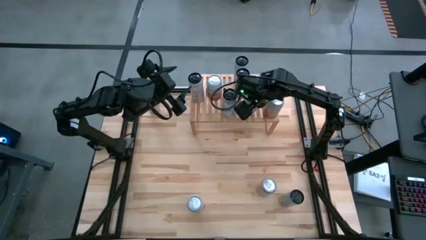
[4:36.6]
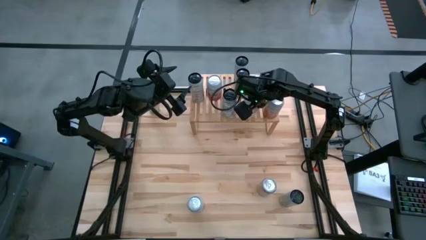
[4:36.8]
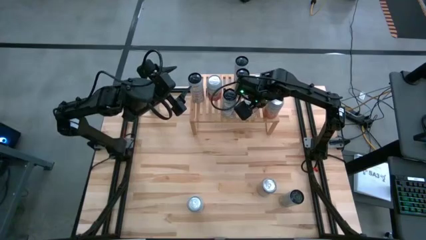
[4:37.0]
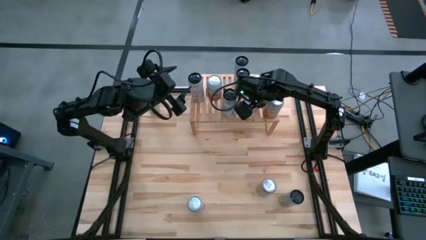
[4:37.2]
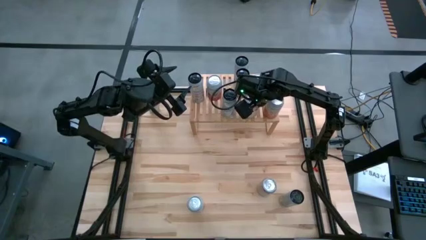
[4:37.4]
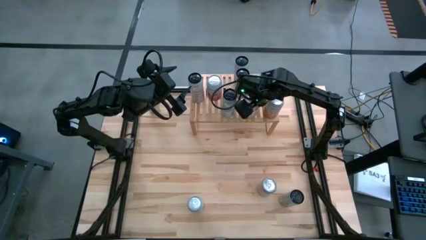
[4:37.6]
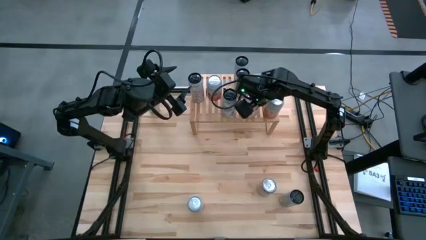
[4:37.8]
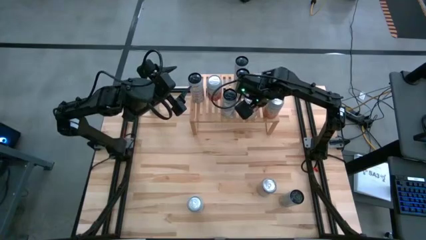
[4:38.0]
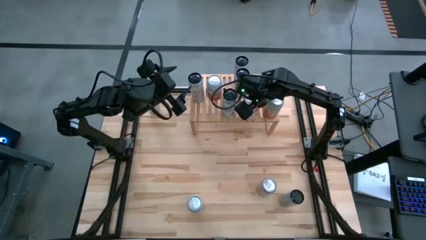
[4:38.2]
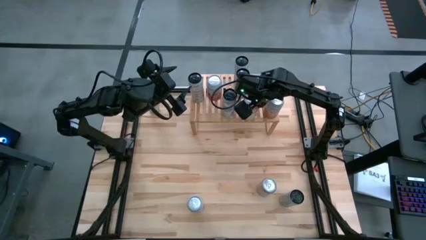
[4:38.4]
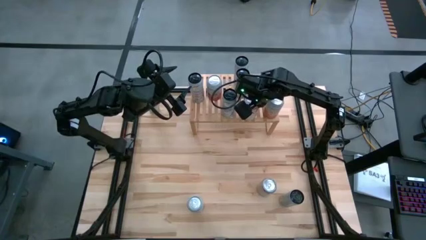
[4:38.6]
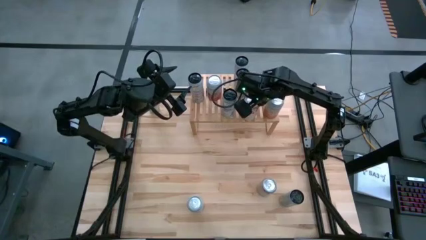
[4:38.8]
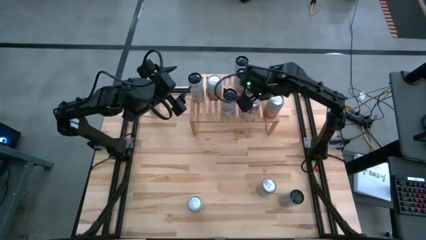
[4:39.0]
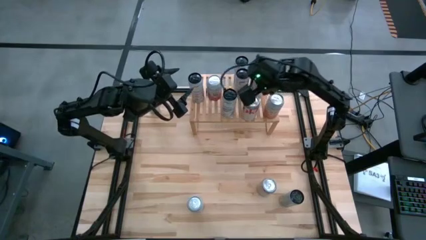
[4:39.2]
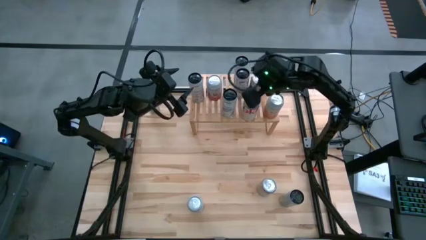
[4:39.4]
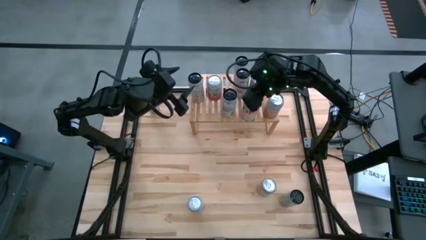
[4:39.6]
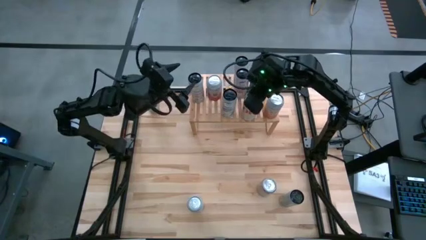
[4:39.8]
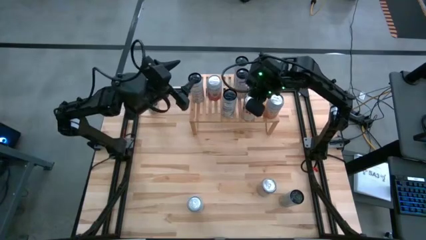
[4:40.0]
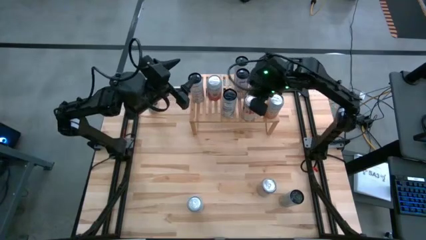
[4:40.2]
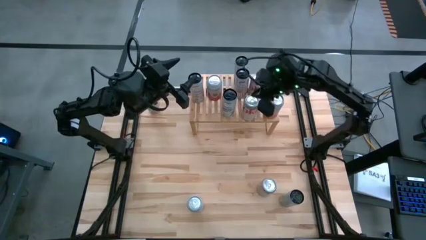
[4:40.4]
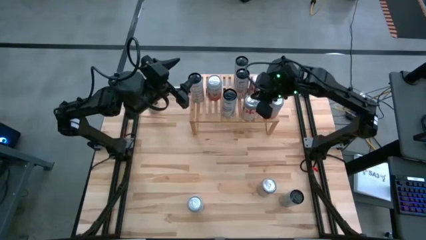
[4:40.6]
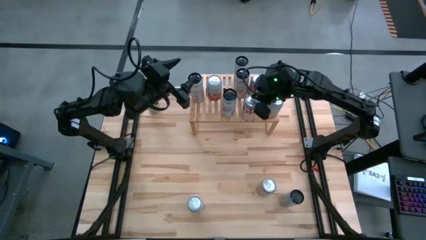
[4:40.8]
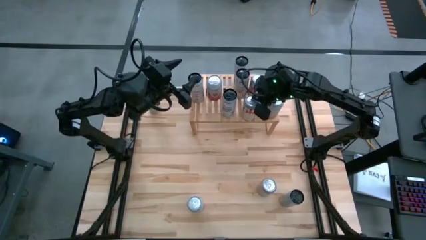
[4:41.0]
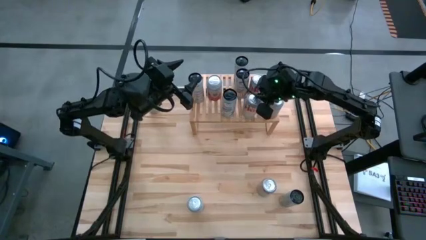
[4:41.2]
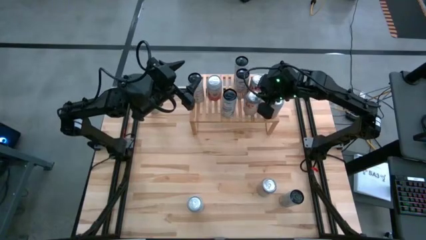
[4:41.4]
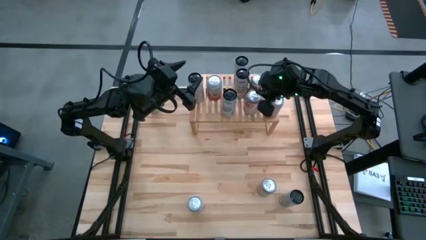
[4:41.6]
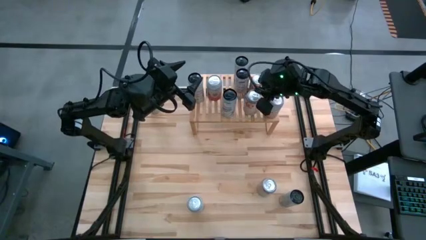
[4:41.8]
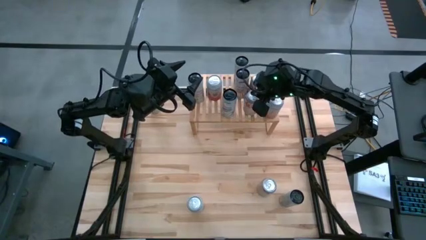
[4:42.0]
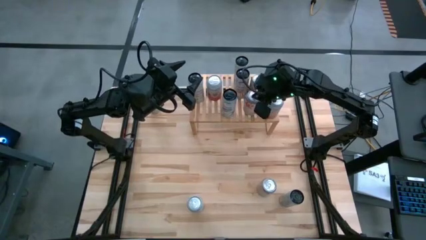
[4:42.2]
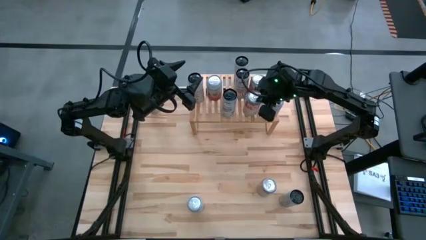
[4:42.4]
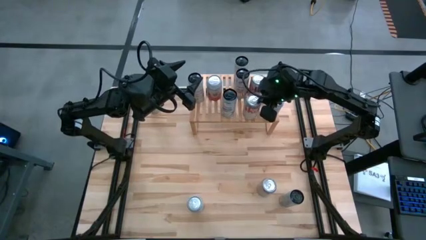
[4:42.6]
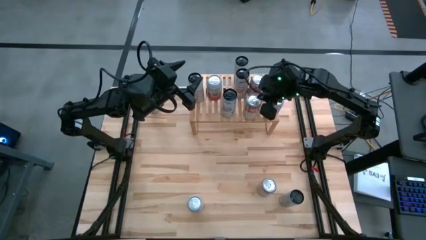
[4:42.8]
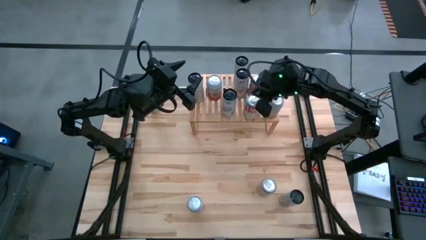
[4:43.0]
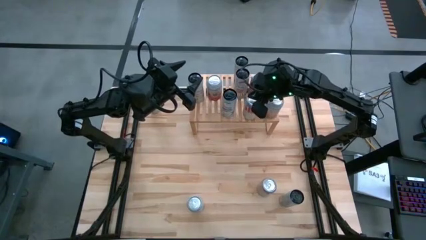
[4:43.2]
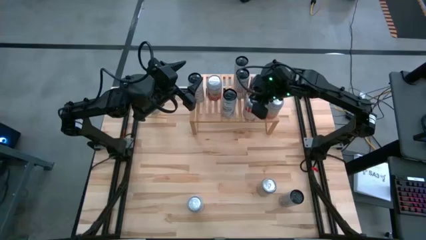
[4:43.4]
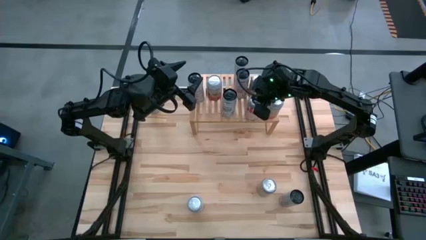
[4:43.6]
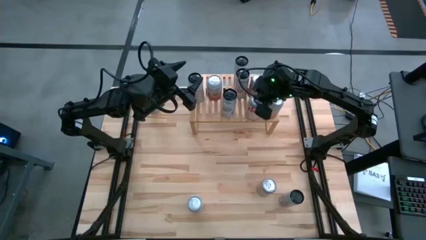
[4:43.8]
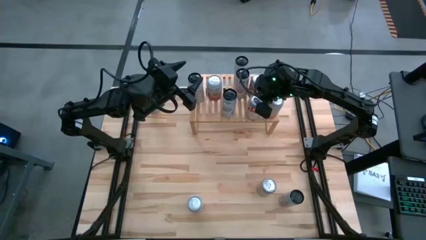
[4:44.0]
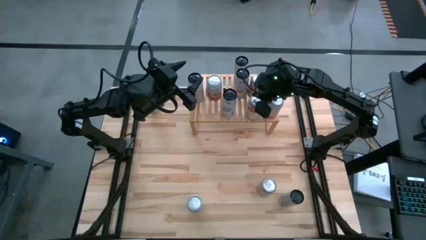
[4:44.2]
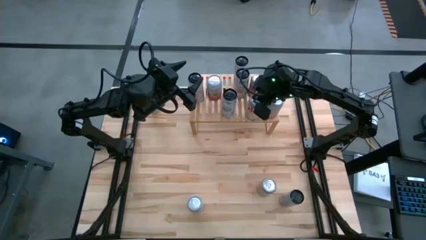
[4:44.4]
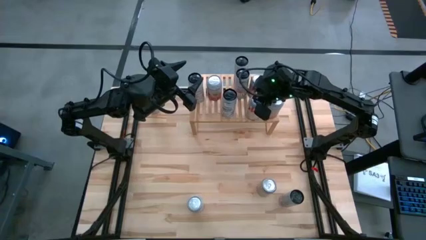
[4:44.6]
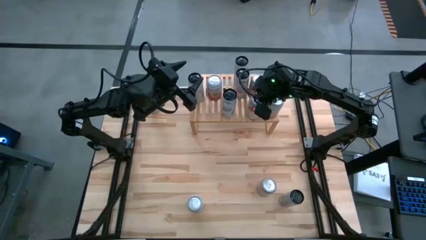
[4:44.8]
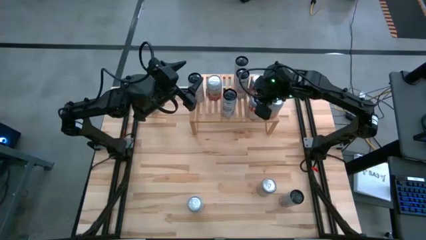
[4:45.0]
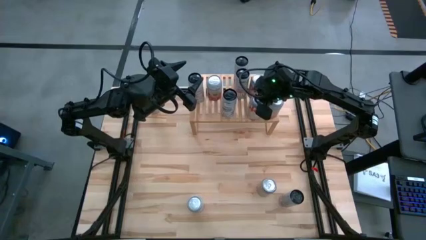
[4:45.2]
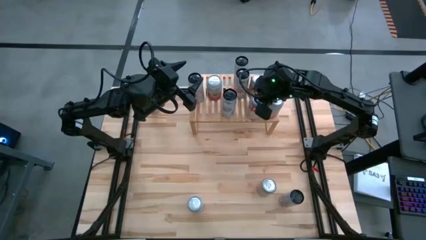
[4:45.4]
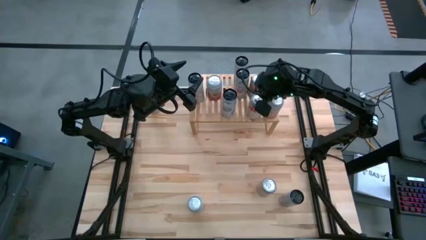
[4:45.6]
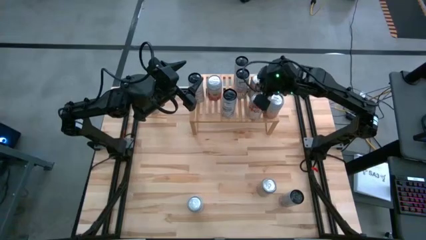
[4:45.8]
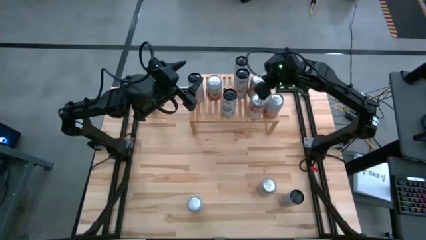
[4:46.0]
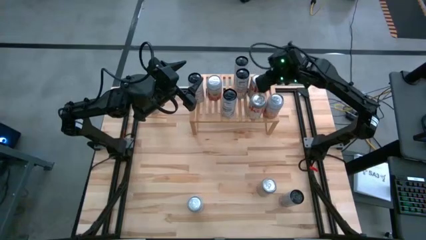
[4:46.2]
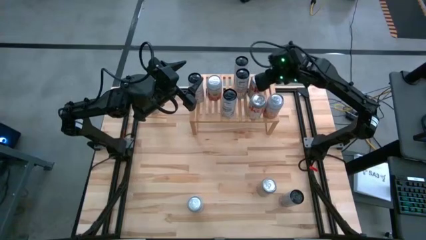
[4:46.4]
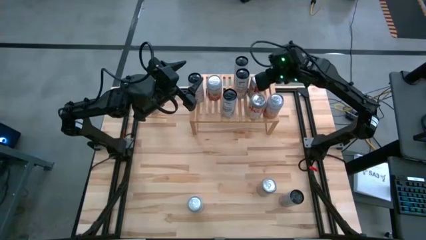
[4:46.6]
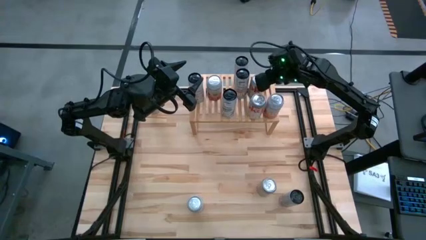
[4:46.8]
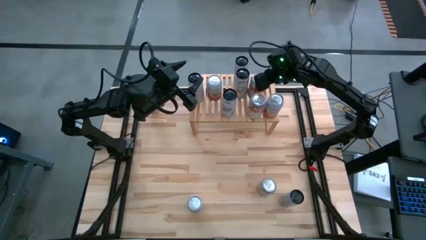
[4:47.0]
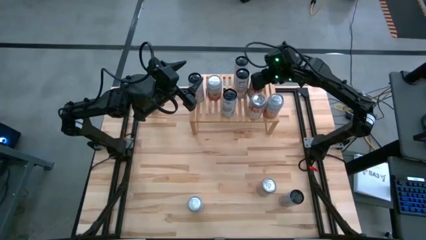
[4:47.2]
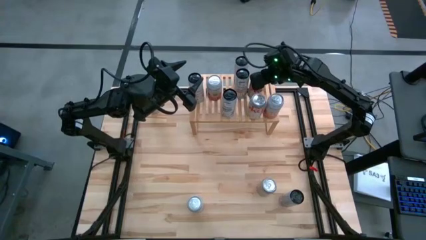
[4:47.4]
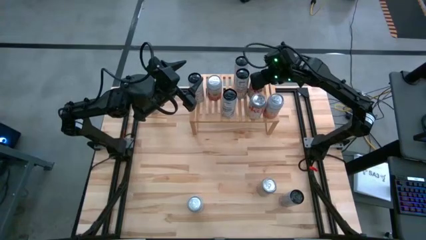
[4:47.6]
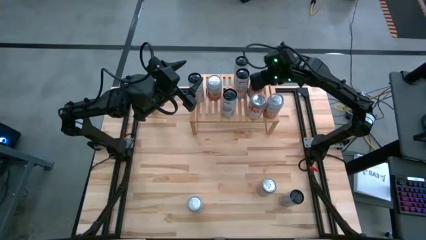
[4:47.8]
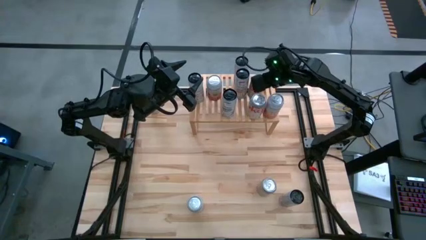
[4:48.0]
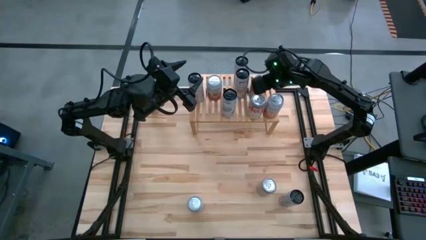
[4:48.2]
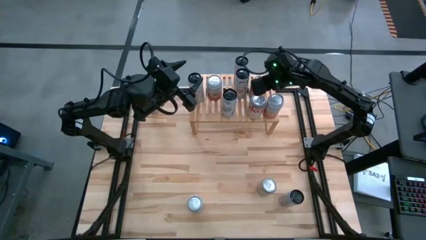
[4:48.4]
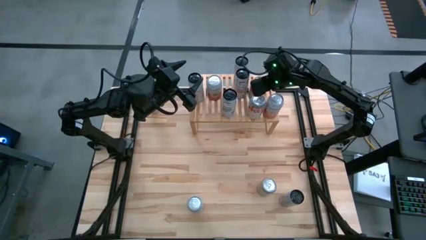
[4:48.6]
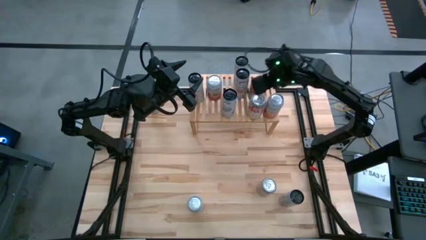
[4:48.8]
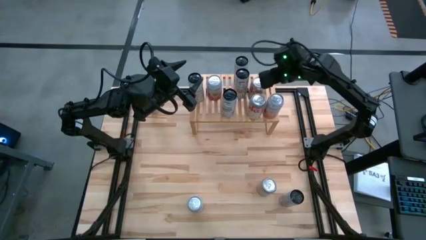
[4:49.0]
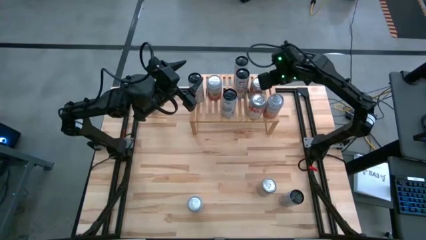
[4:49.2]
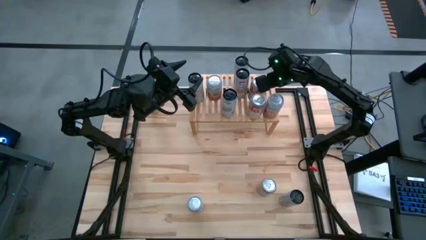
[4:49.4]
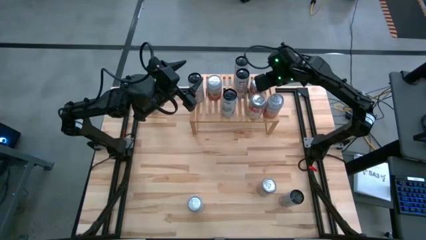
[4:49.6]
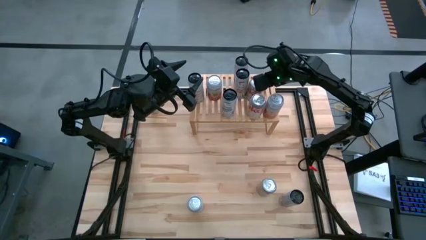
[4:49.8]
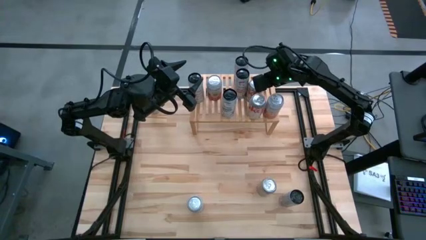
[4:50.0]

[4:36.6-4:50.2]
Task: Place canned beverage on shelf
Put the top silver soda can on the shelf aligned with the other silver soda can

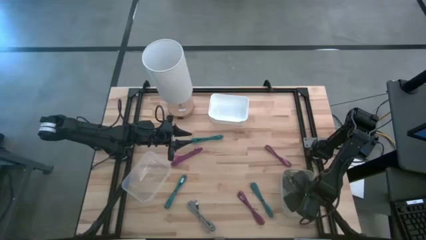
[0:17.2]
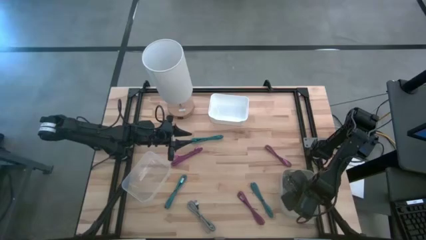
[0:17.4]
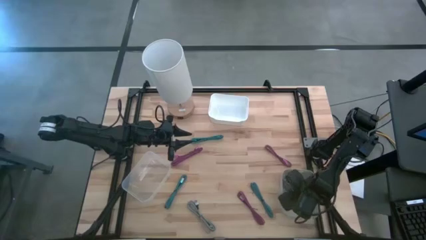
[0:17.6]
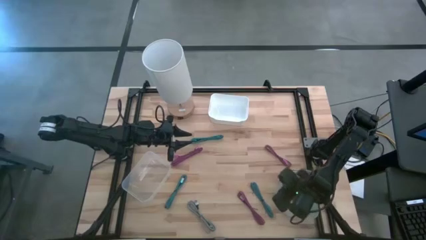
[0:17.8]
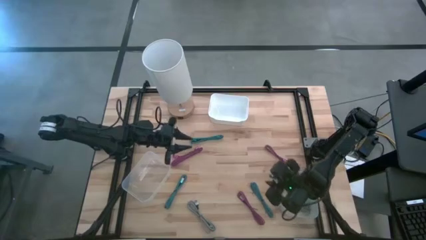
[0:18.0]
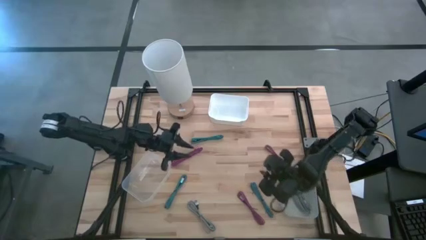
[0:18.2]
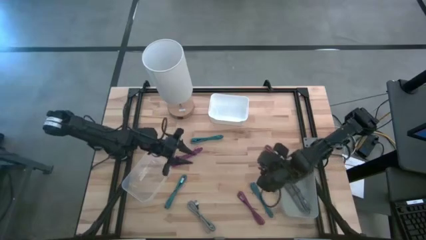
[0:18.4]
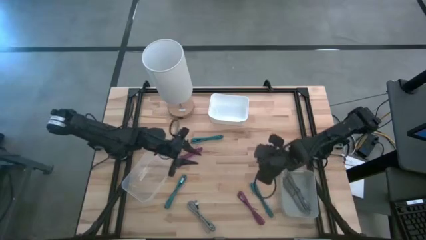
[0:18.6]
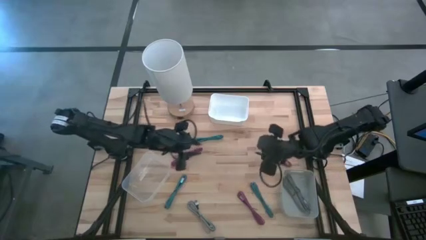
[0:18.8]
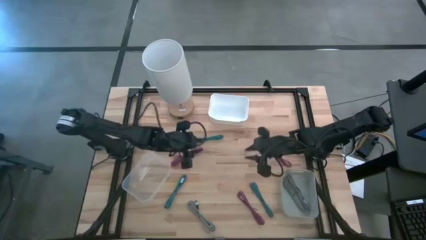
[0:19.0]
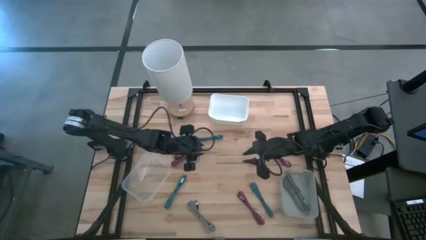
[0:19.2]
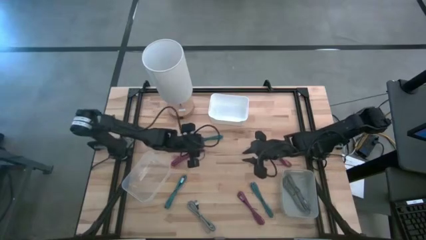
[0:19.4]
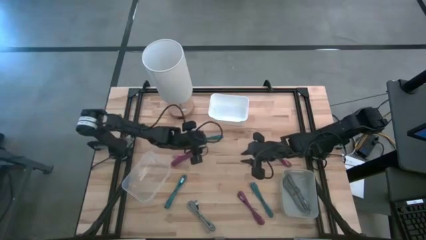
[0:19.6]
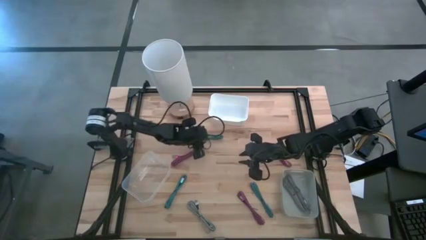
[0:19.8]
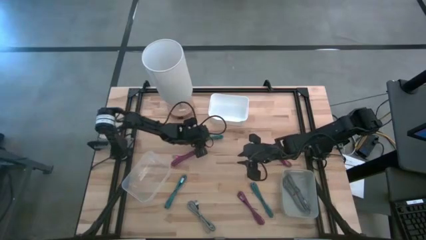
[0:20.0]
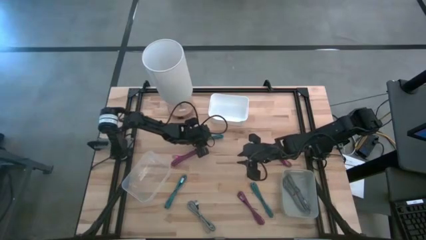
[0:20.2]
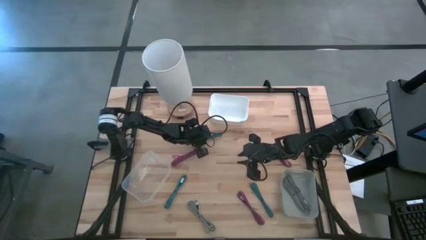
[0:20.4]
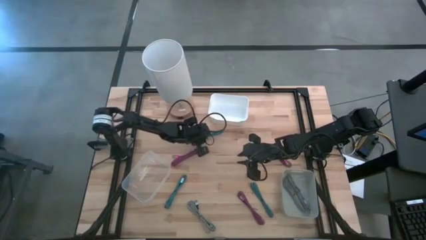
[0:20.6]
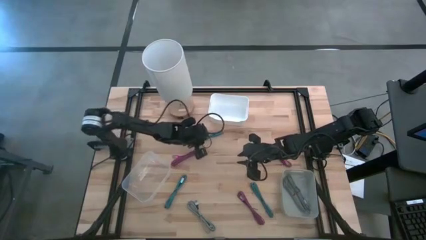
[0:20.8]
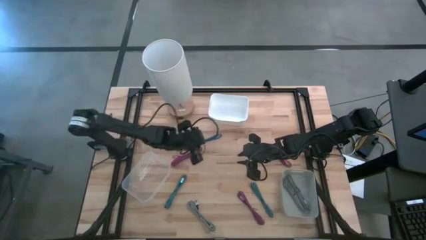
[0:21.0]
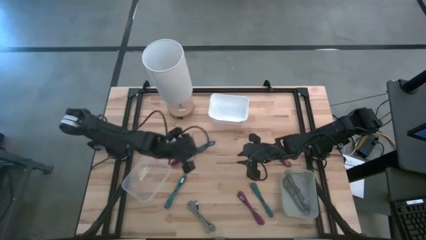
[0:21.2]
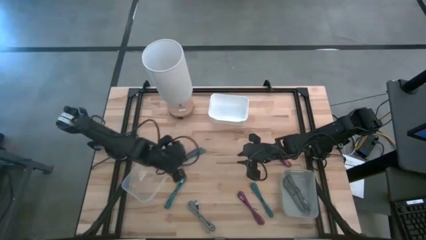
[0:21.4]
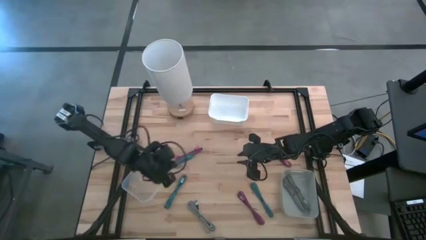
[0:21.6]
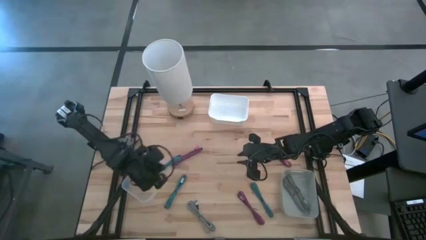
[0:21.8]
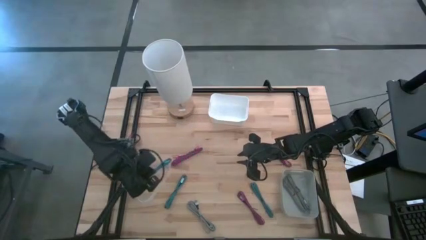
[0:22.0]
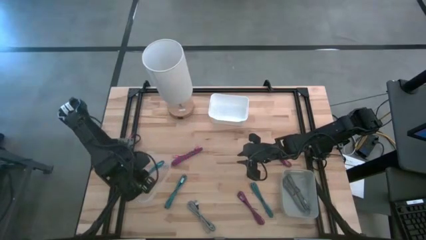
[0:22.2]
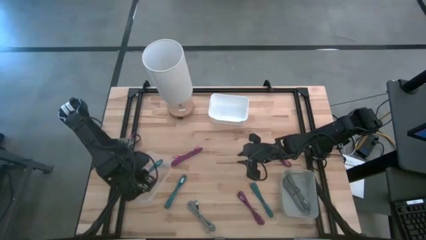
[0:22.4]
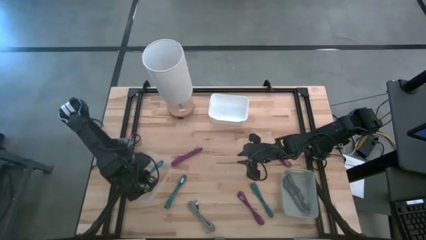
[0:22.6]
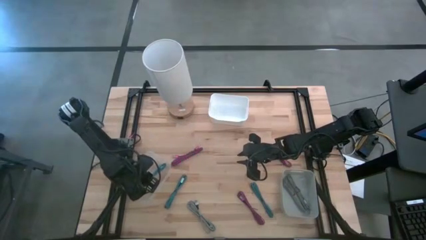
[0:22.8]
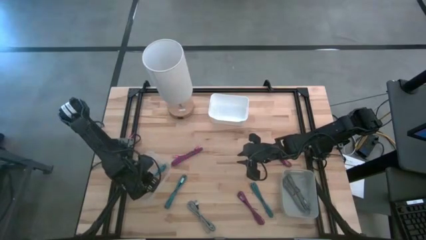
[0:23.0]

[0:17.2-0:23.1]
Task: Pick & Place USB Port
Put the top left blue charger cable into the transparent bin
